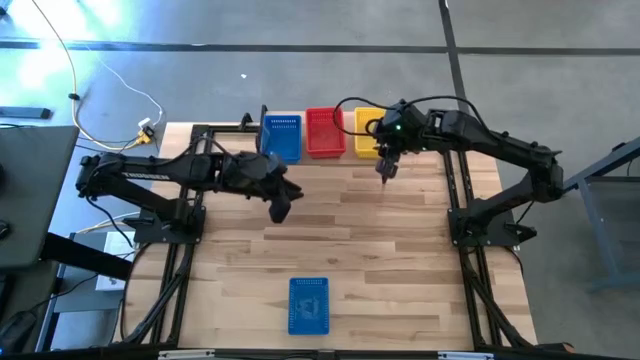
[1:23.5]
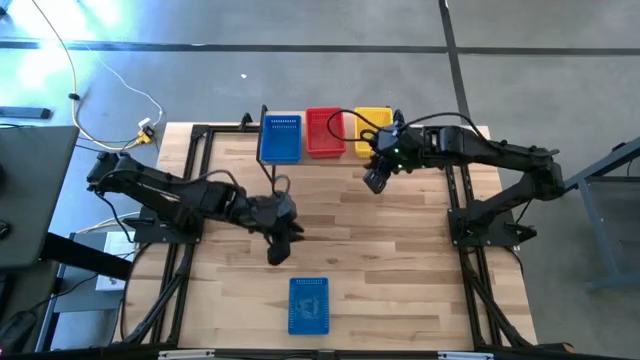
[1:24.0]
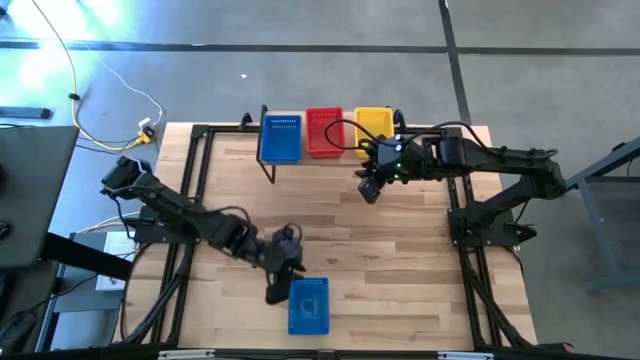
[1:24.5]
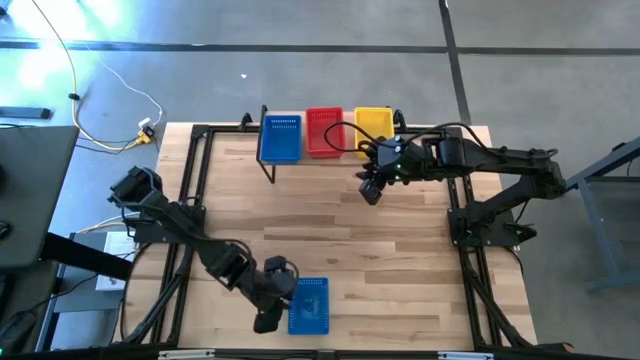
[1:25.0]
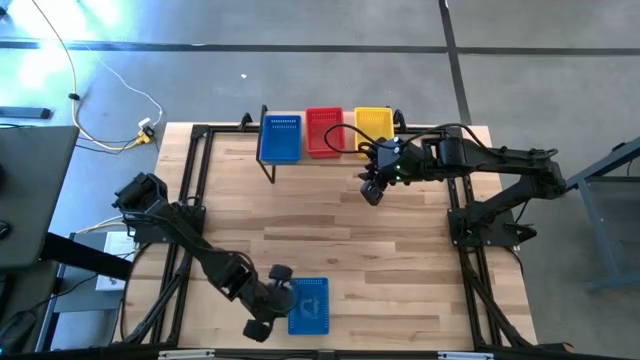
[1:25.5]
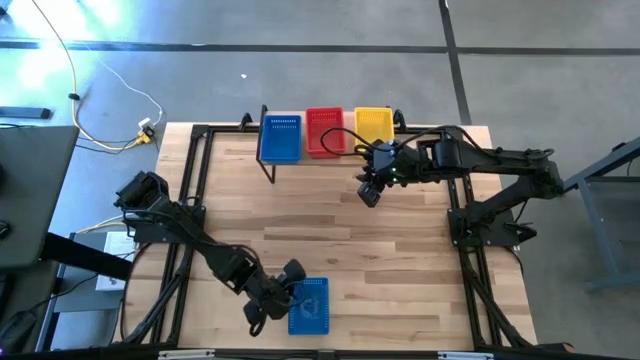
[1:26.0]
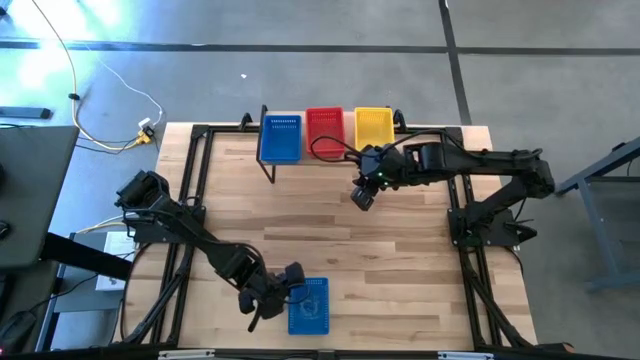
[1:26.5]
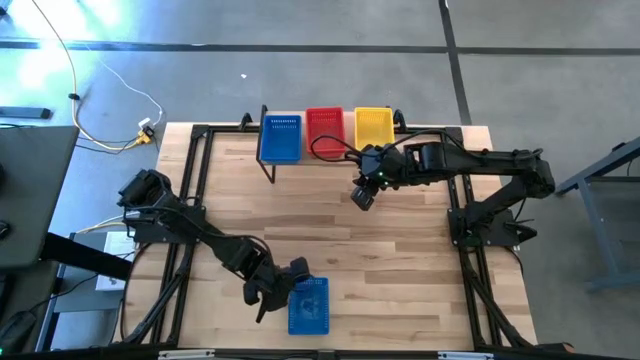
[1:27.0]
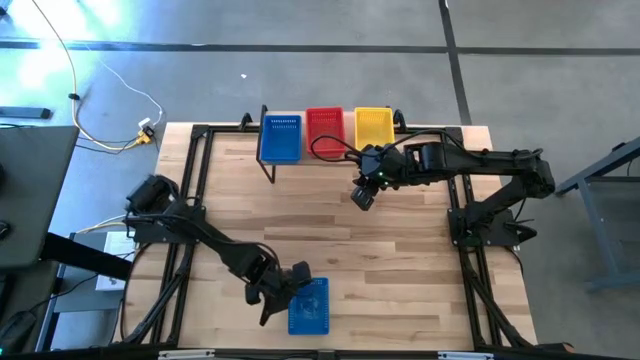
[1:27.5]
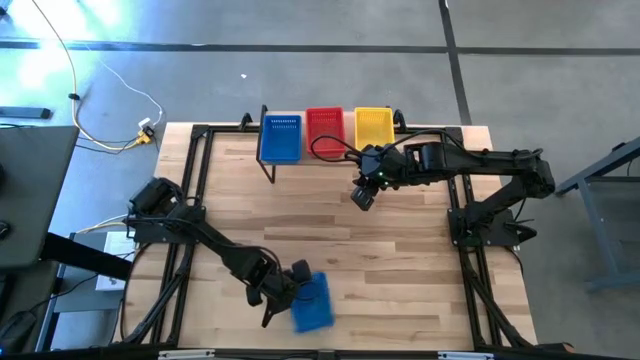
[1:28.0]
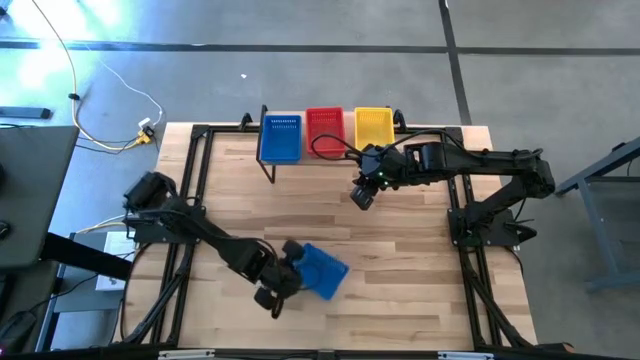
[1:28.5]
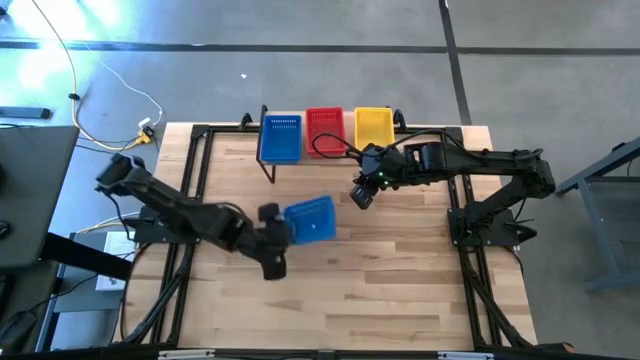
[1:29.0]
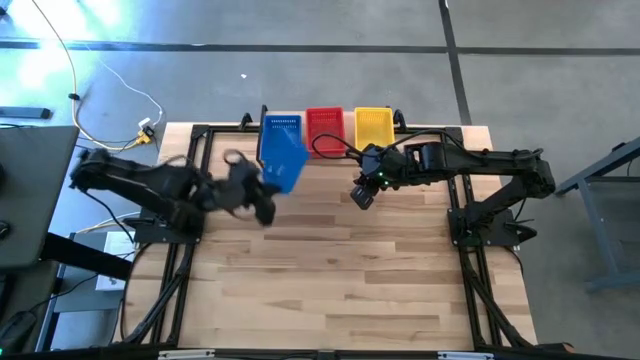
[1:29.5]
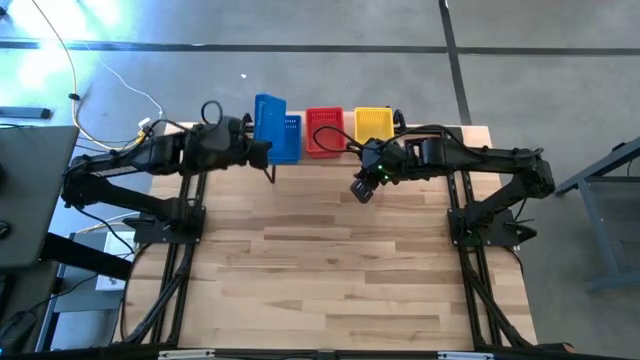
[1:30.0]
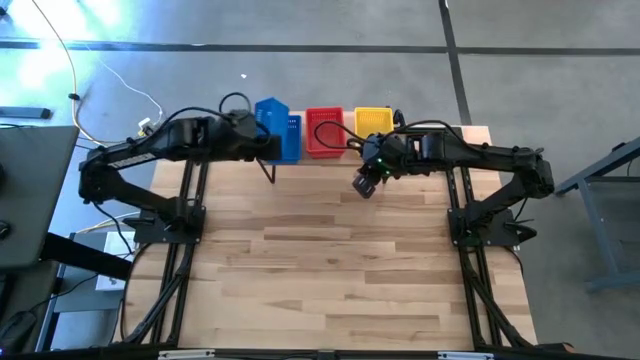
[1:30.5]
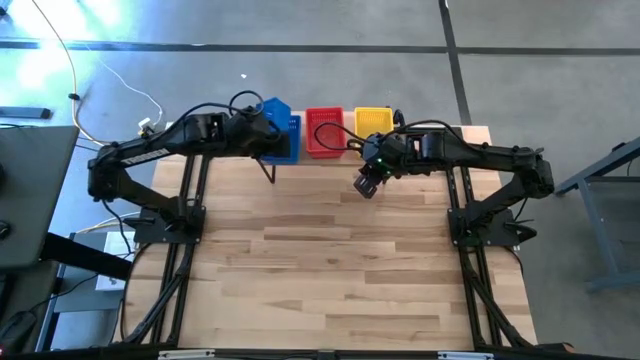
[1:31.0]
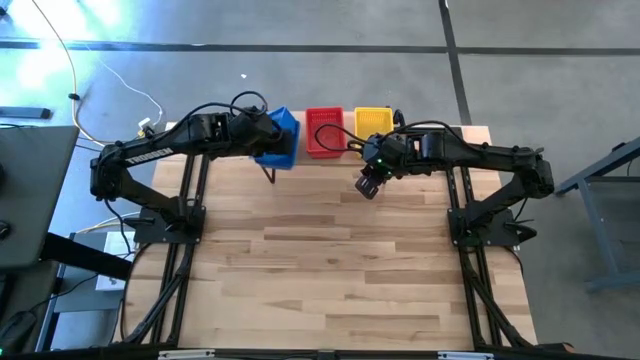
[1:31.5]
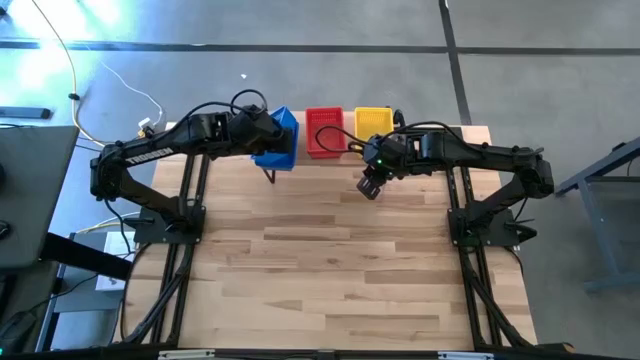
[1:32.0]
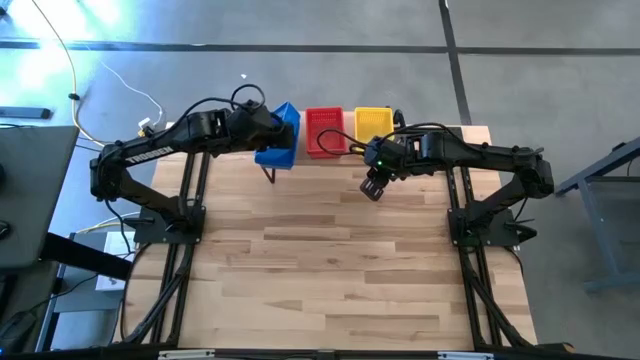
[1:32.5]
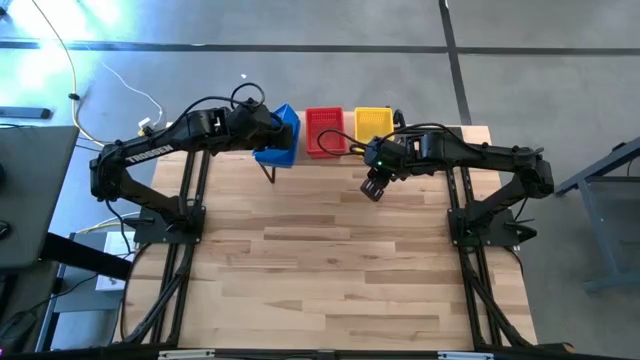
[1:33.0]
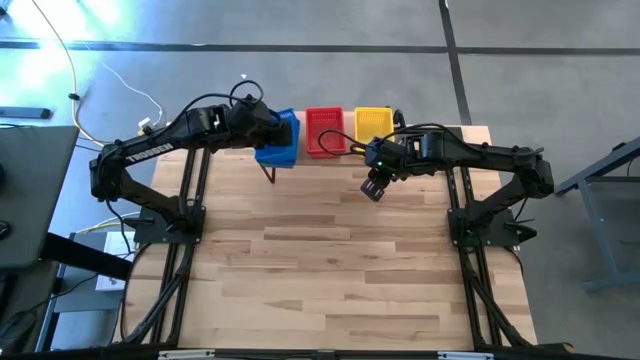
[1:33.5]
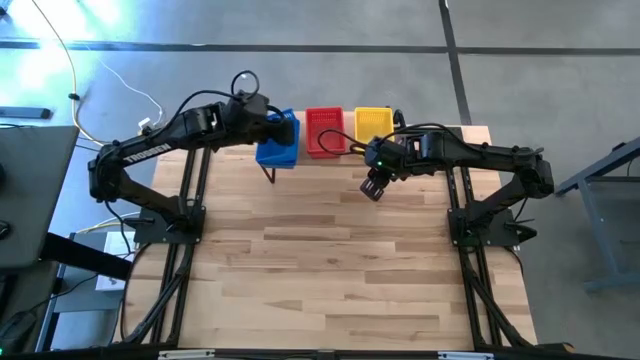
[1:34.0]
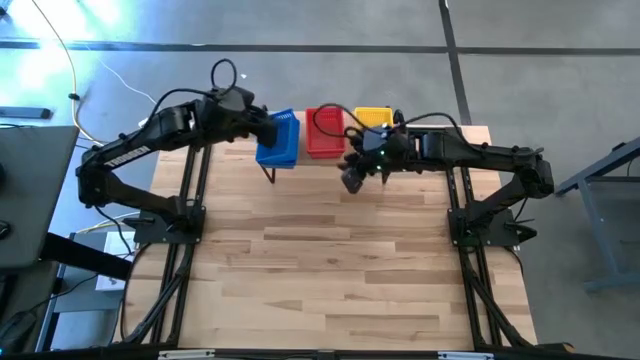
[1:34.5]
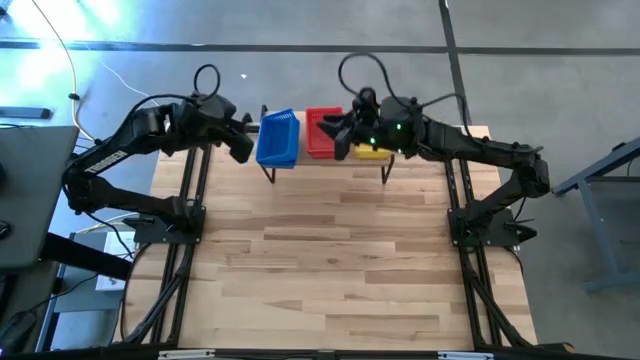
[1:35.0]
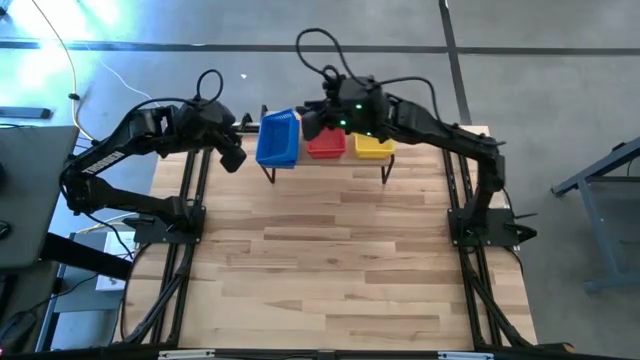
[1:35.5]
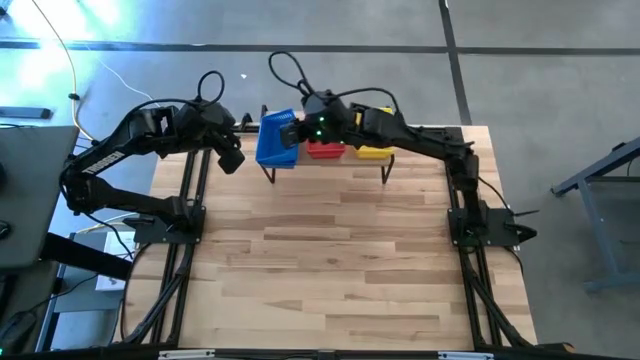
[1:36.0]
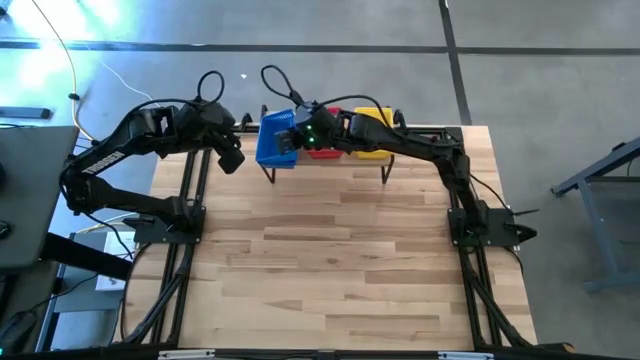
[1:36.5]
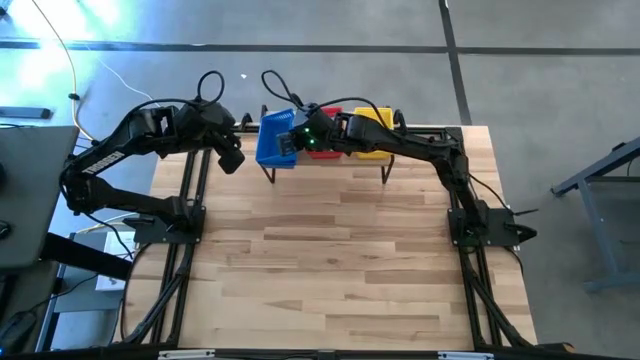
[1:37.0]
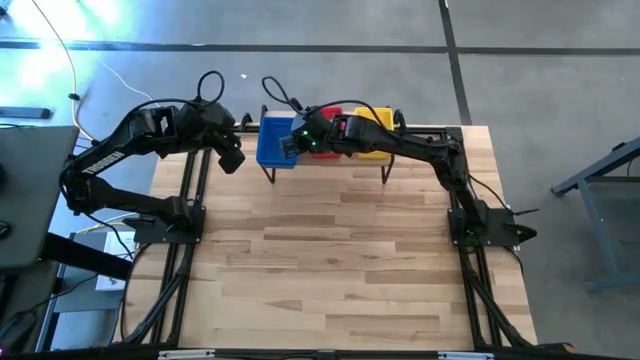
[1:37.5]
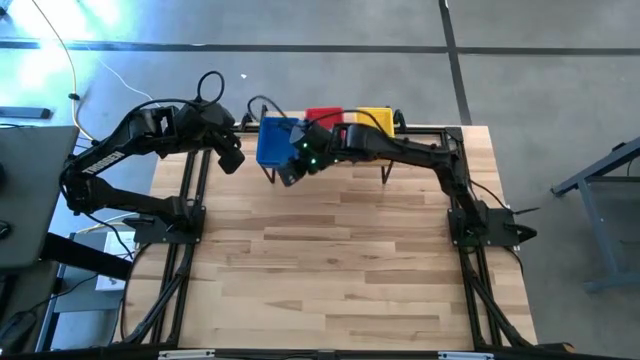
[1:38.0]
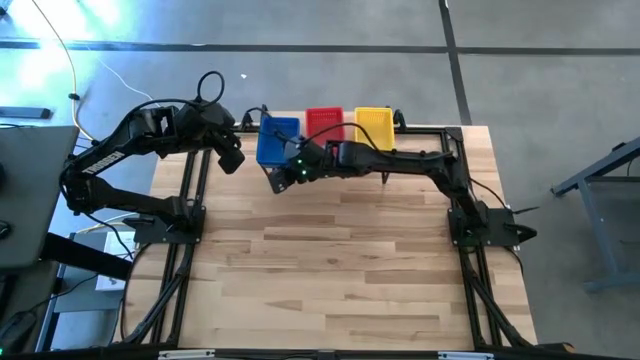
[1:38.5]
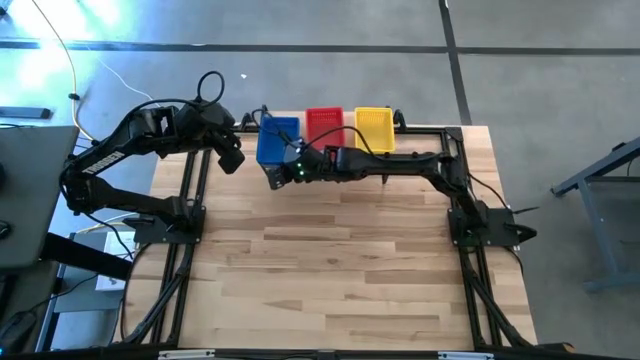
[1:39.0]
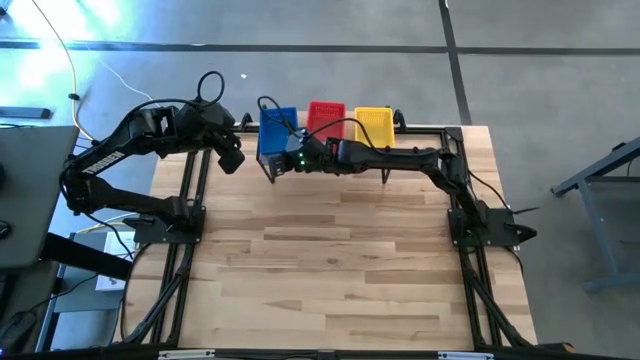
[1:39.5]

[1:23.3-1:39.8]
Task: Stack baskets on shelf by color
Stack the blue basket on top of the blue basket on the shelf

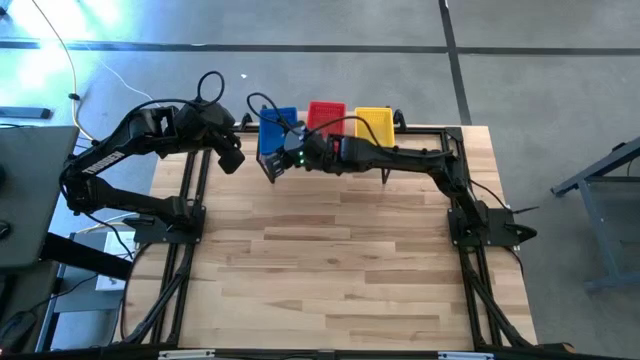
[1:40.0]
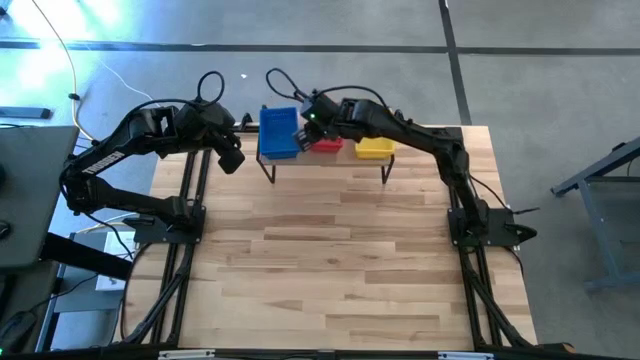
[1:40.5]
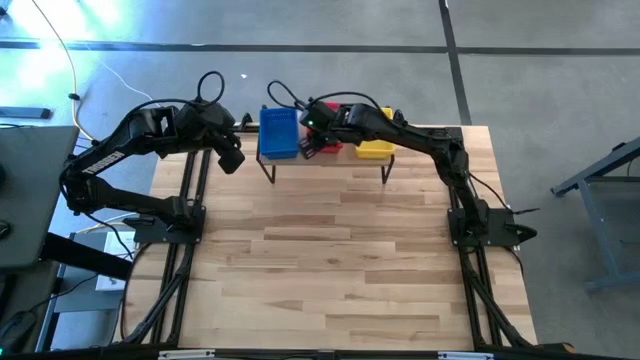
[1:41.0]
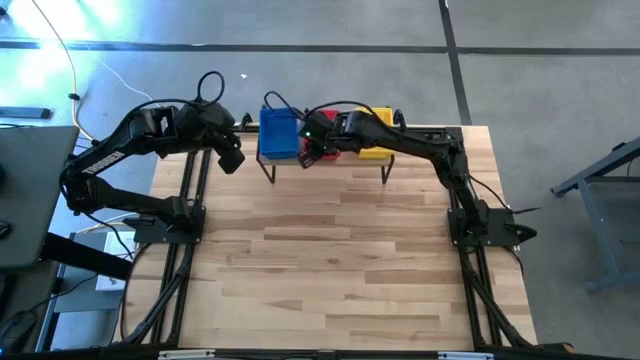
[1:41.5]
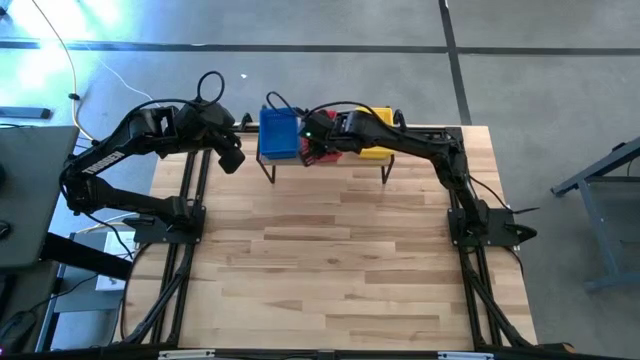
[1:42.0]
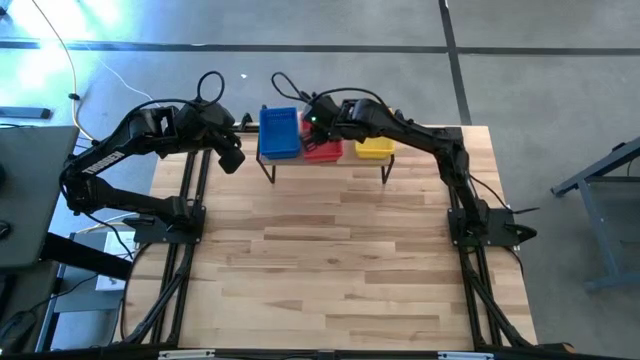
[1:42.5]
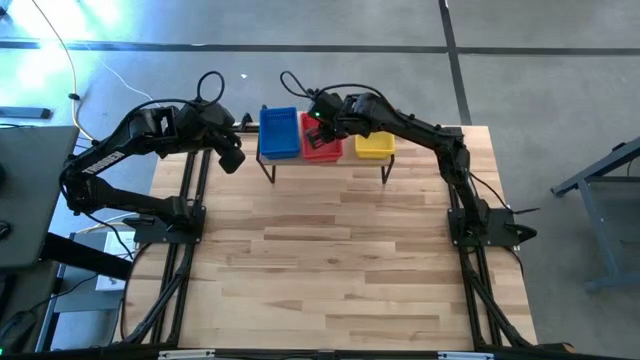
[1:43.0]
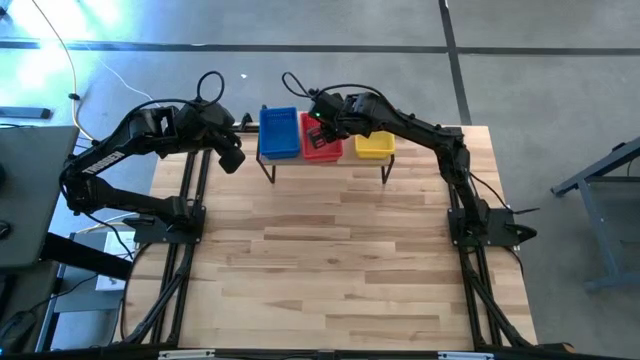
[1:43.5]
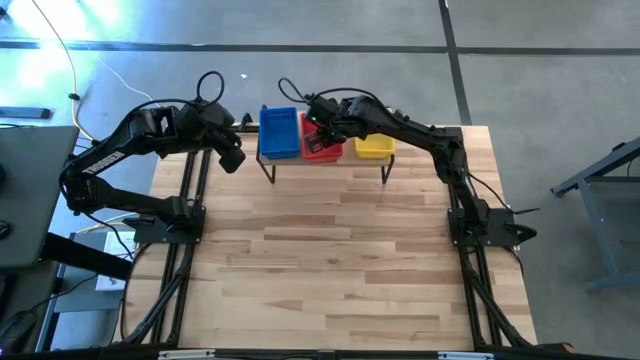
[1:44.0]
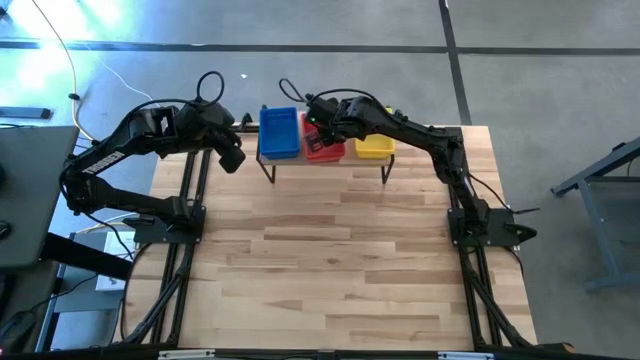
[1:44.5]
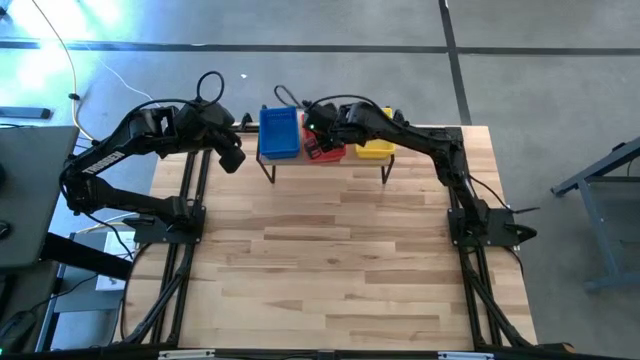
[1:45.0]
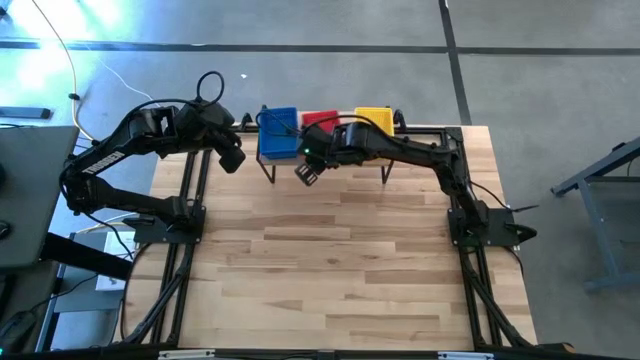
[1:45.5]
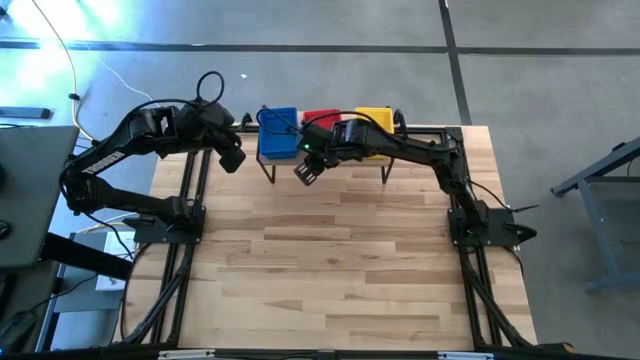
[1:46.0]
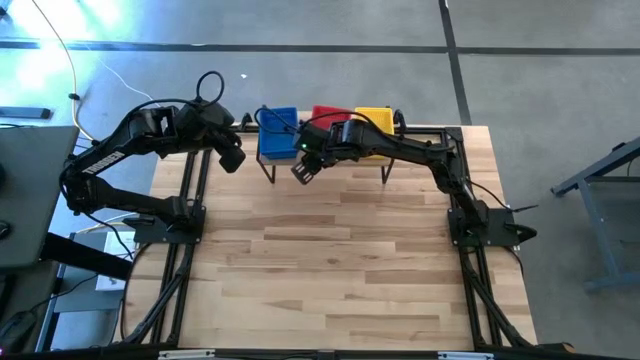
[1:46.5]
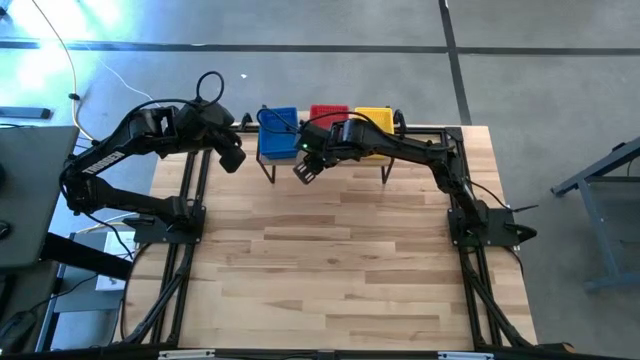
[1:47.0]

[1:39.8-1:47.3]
Adjust the stacked red baskets on the shelf
